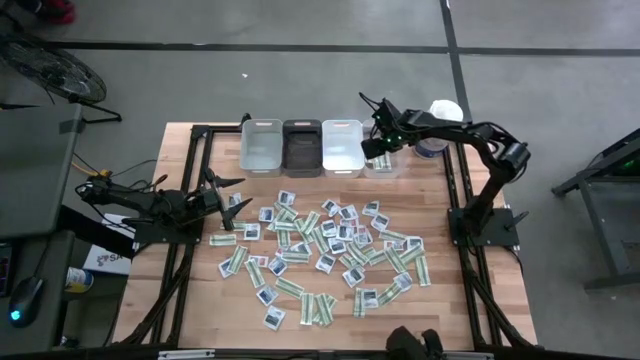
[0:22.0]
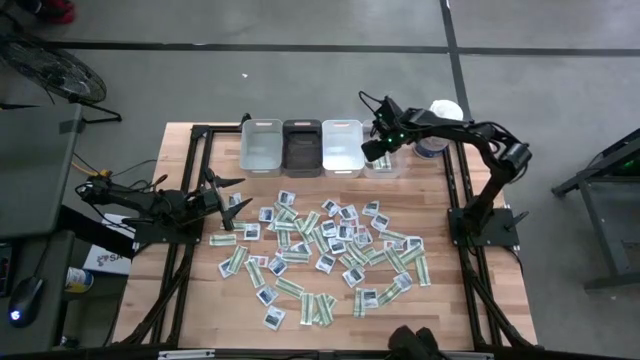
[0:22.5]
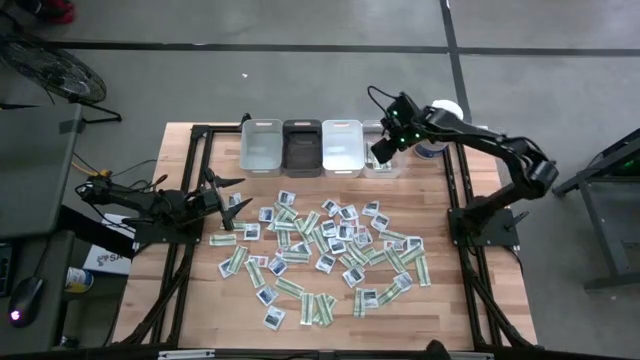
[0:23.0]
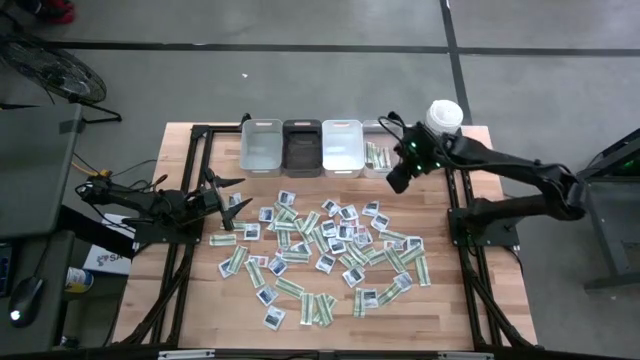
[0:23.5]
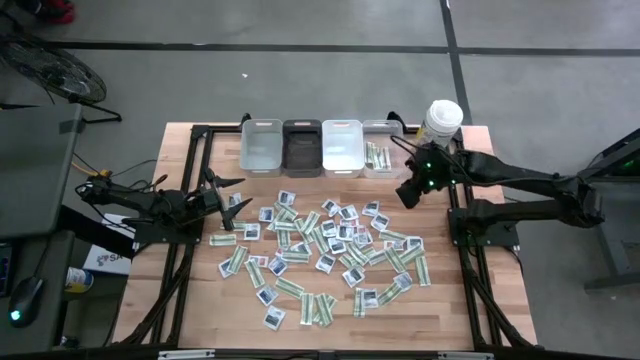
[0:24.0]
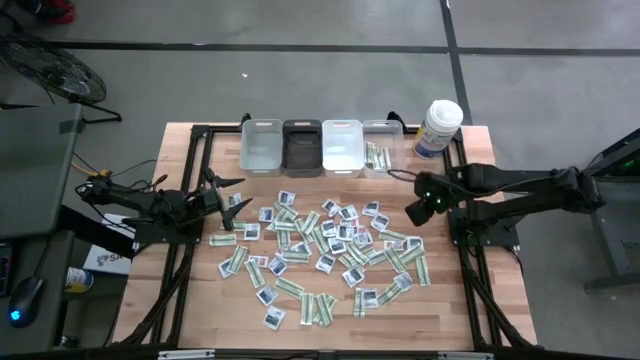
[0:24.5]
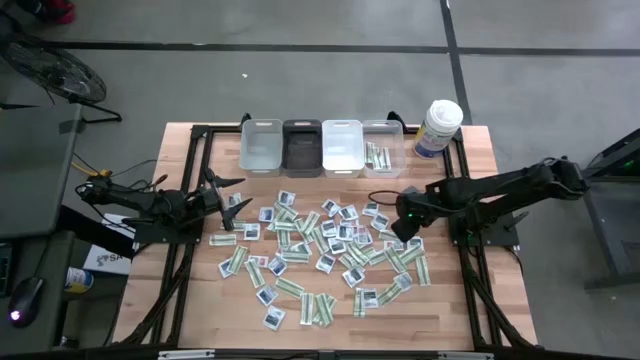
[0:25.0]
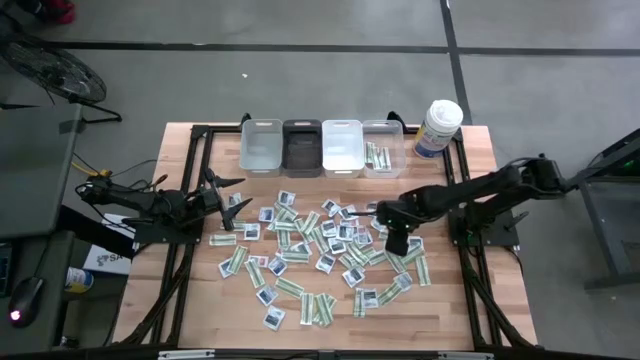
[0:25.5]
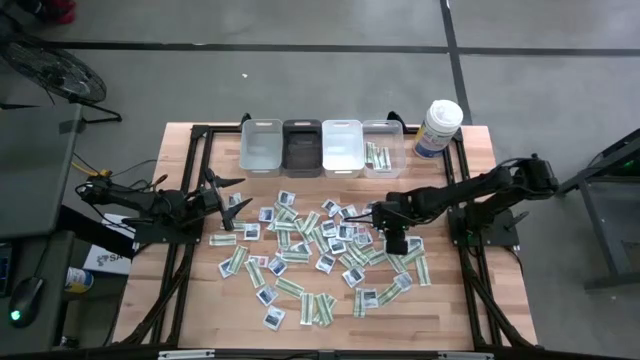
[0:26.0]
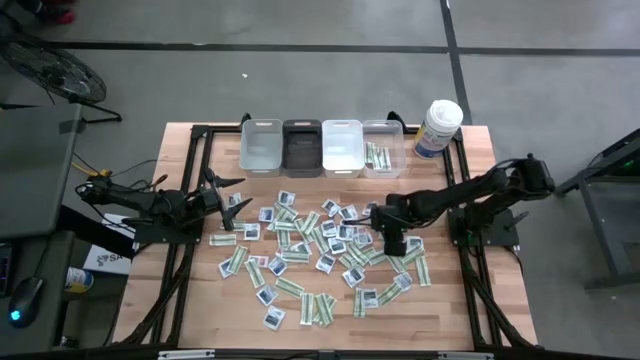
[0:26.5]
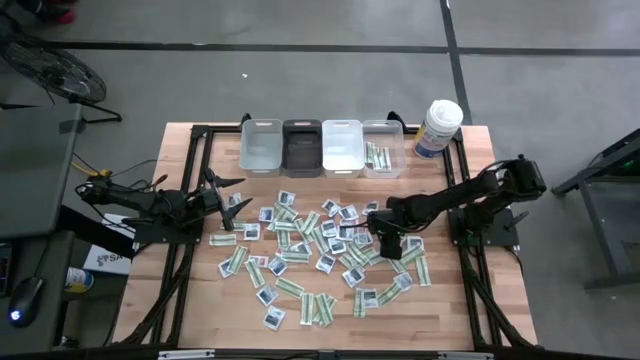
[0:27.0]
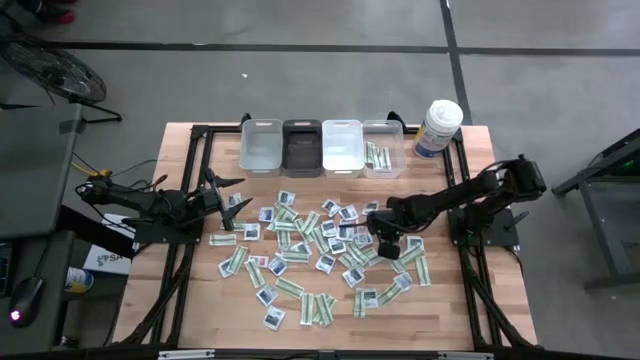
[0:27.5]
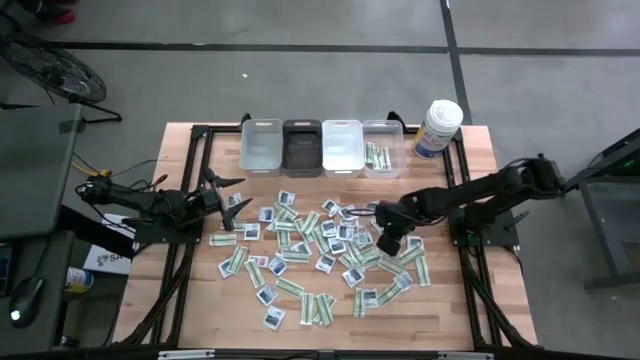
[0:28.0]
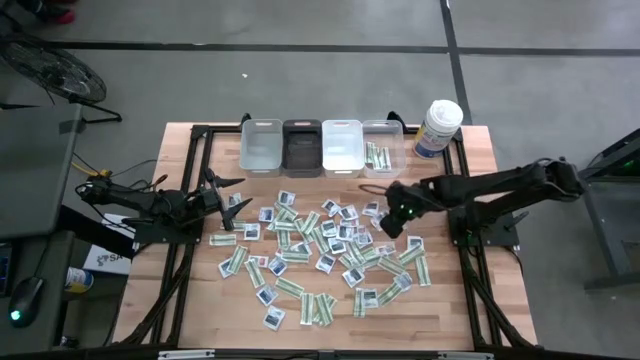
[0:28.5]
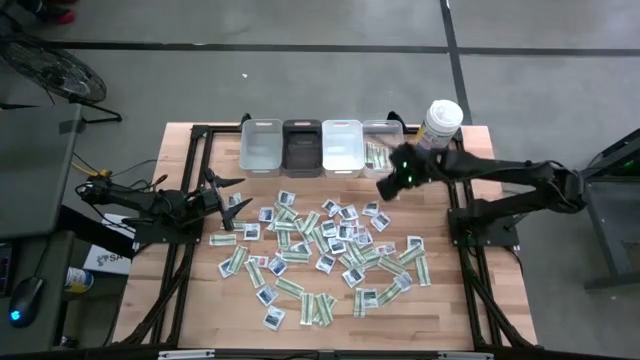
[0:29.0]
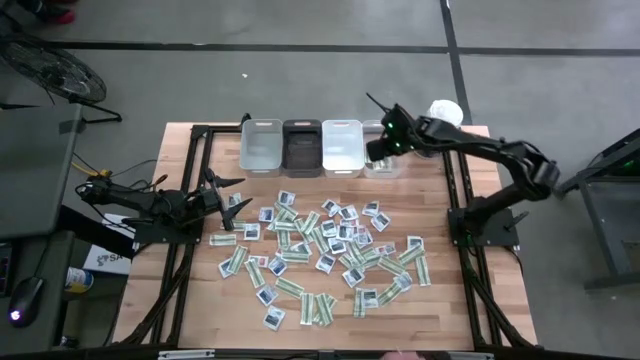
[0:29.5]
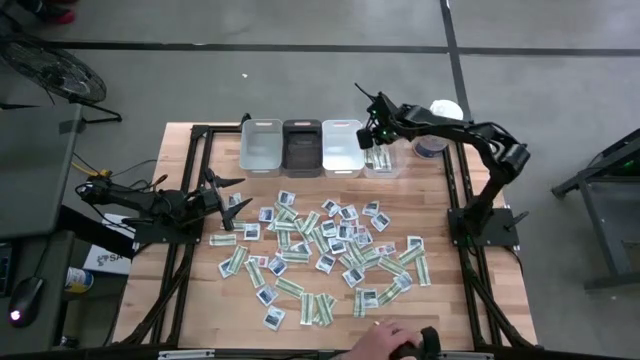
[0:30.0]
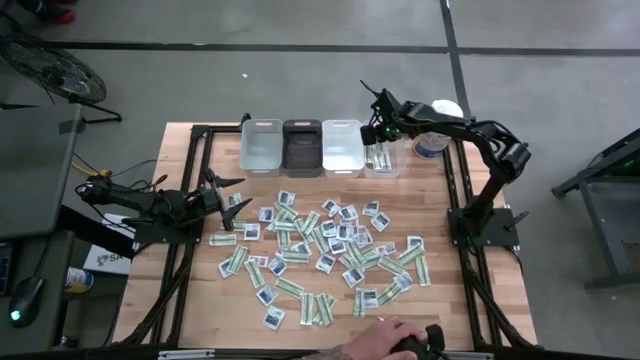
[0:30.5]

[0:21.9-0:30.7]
Task: Pick & Place First Aid Supplies
Put the green bandage into the transparent bin

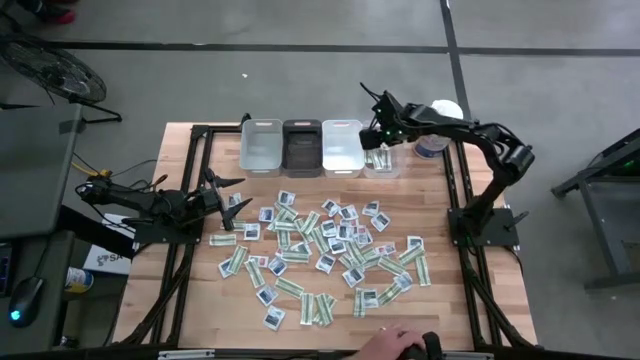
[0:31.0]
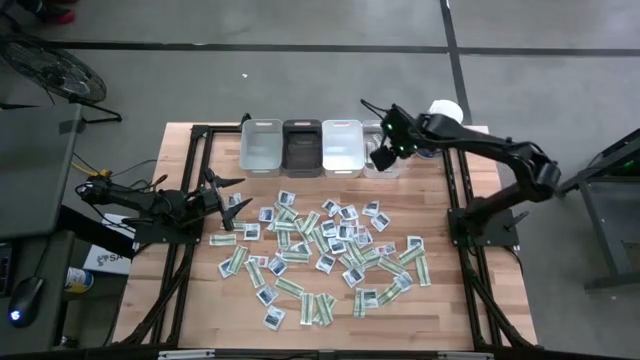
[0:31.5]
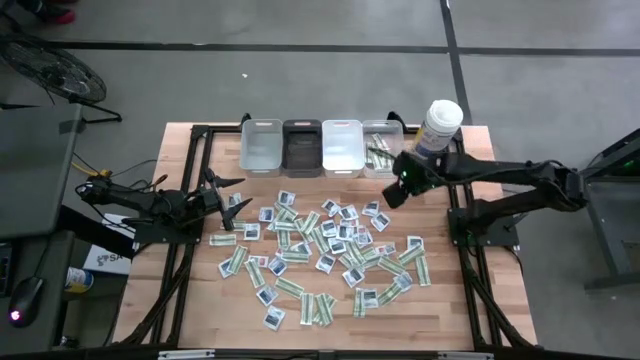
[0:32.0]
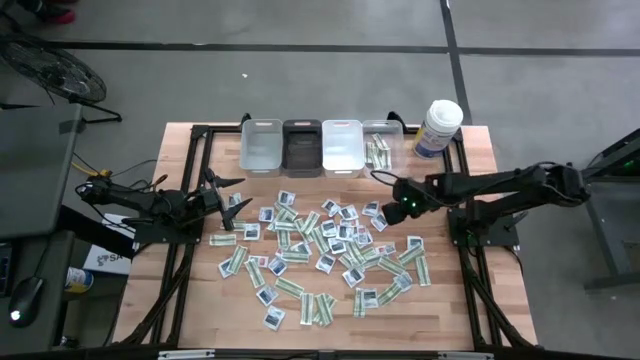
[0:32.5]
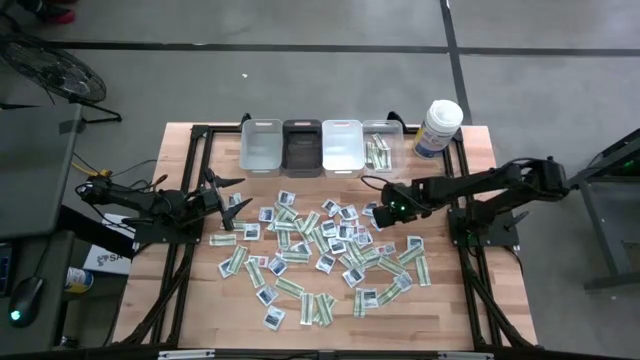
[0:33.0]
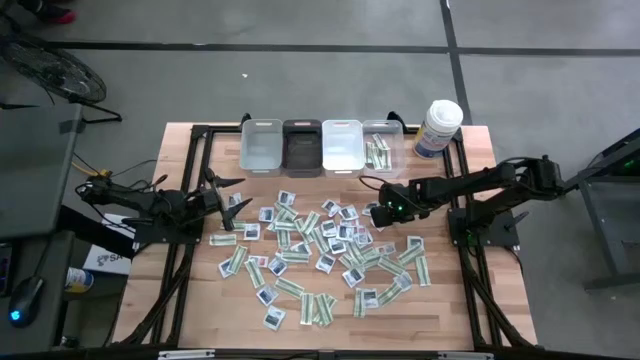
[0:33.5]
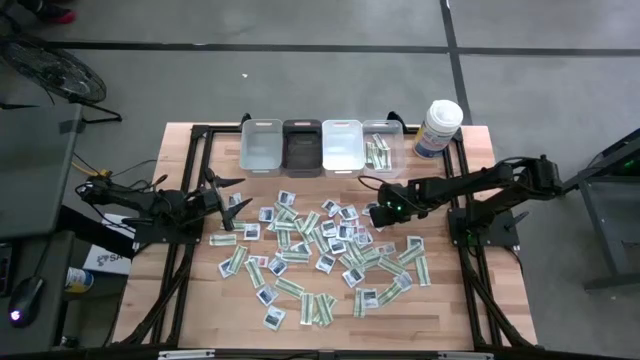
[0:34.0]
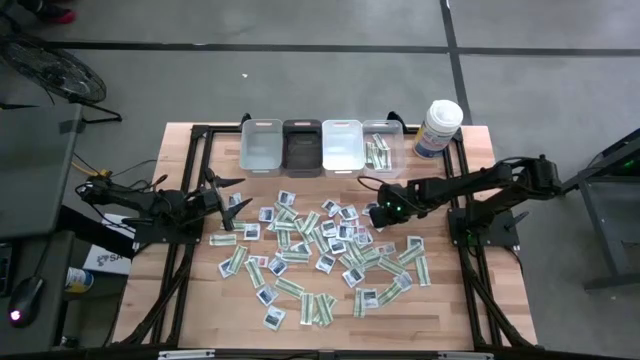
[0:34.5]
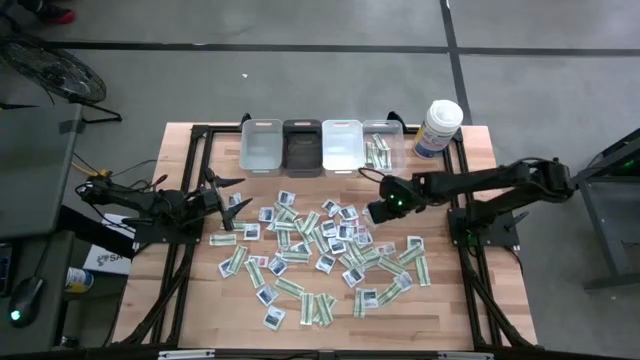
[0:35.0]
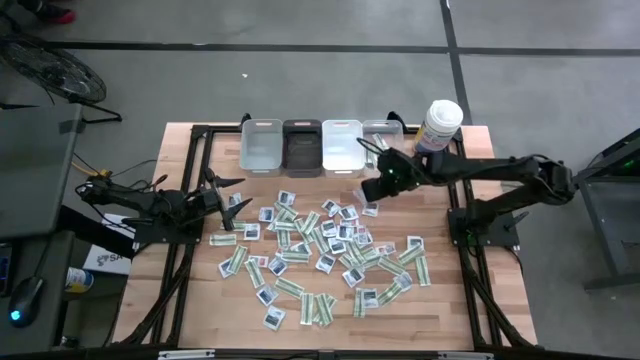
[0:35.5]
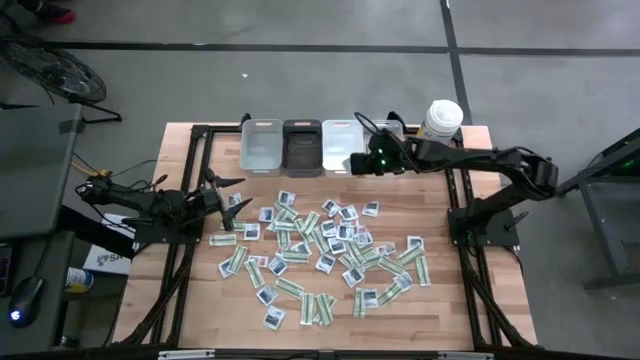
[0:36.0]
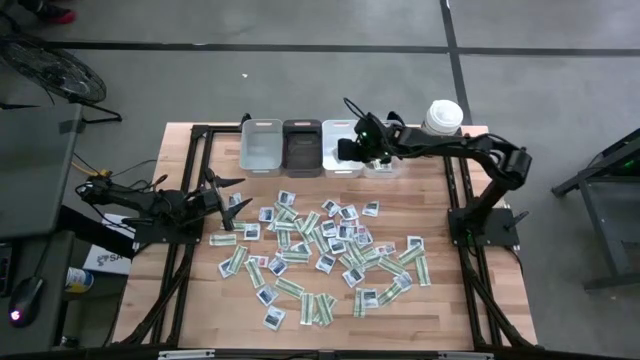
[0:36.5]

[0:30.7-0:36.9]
Put the black towelette pack into the white bin

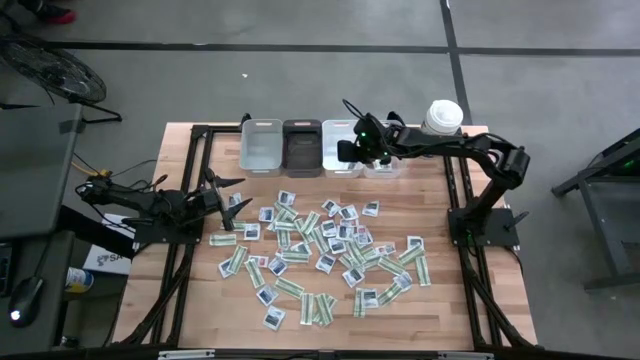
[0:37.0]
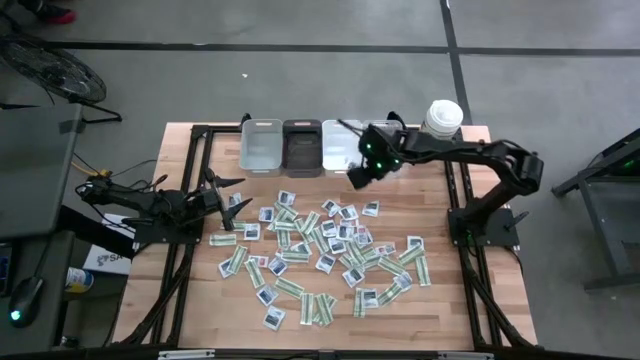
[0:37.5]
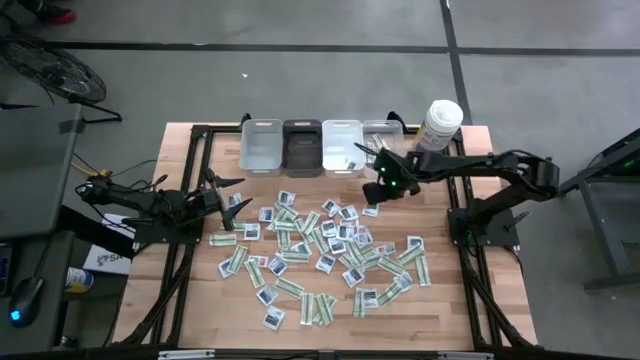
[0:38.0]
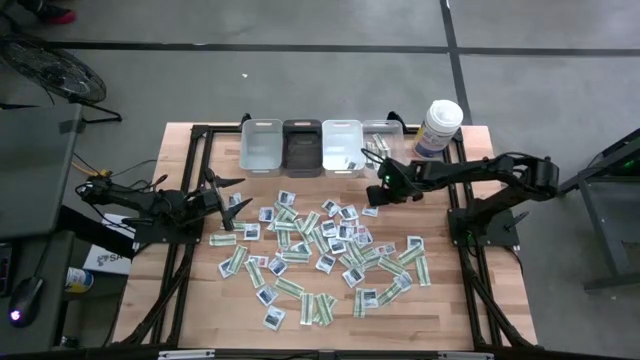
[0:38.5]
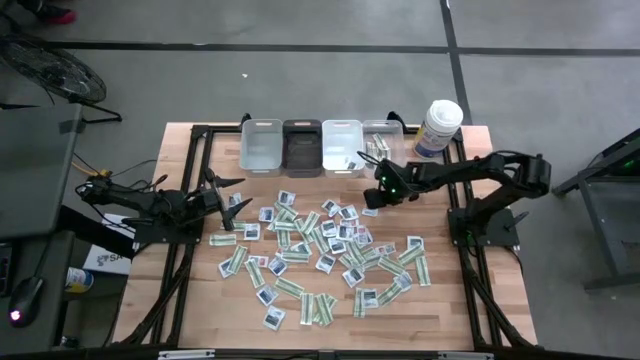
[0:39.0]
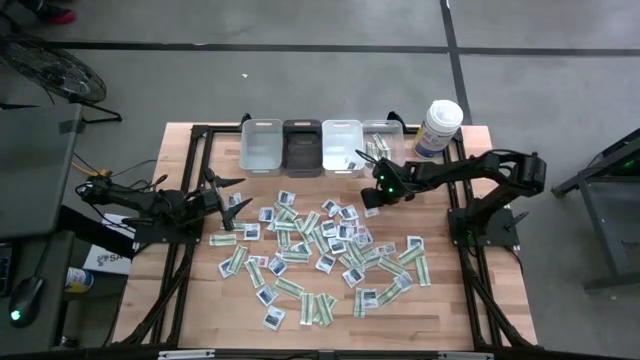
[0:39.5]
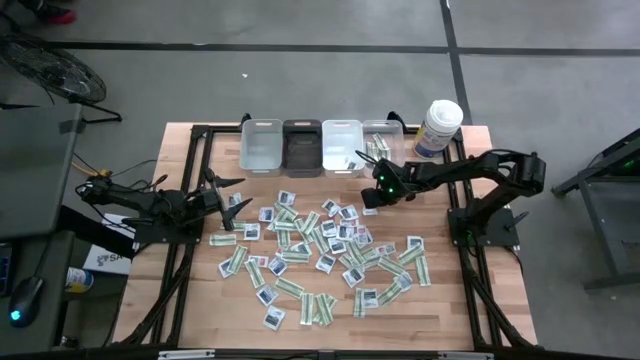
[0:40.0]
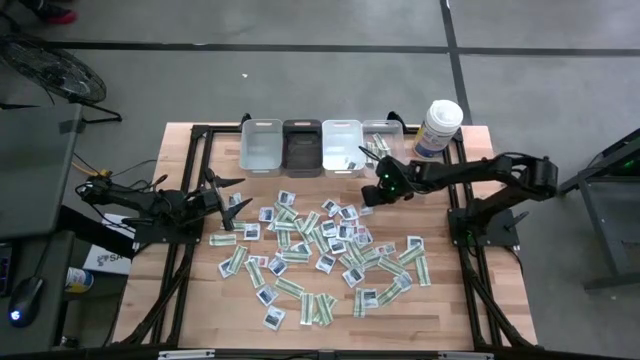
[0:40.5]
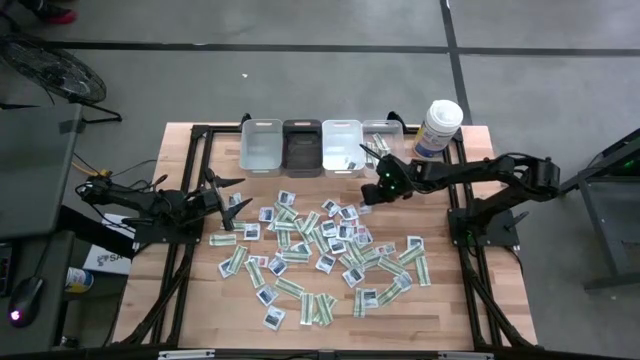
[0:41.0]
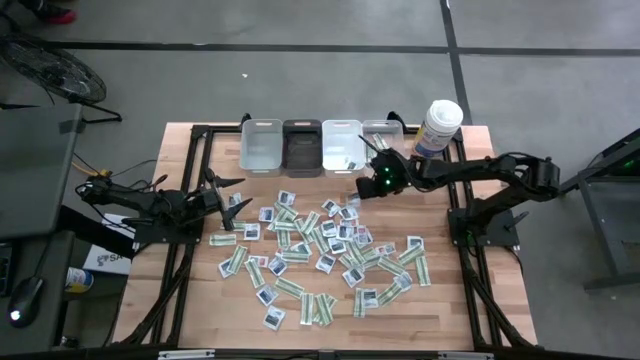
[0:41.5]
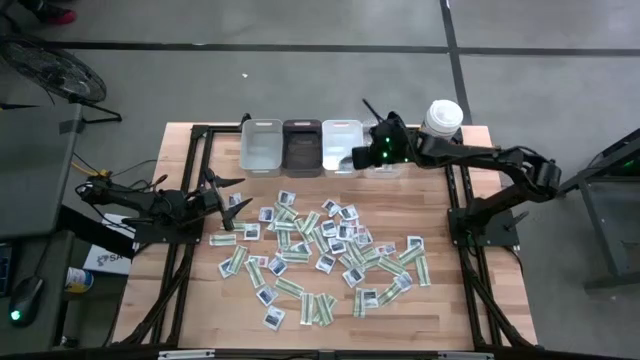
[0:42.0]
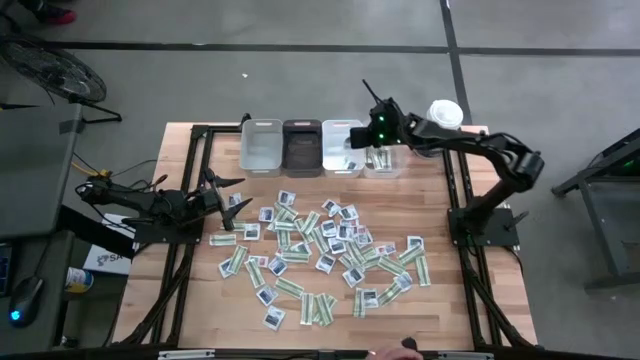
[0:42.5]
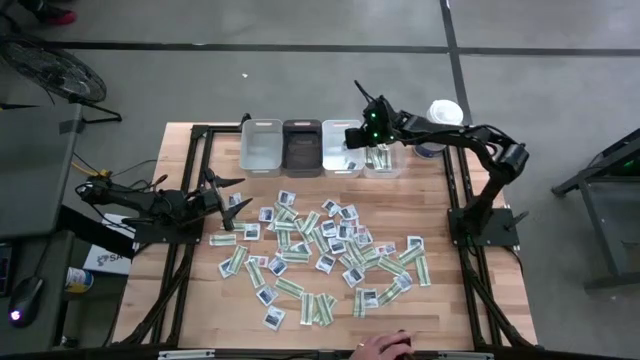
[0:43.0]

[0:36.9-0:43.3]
Put the black towelette pack into the white bin
